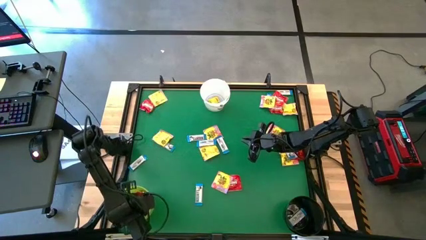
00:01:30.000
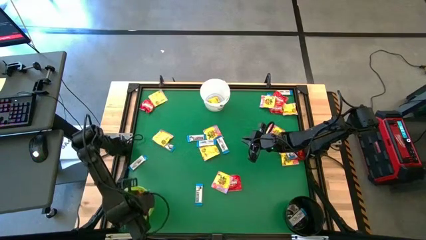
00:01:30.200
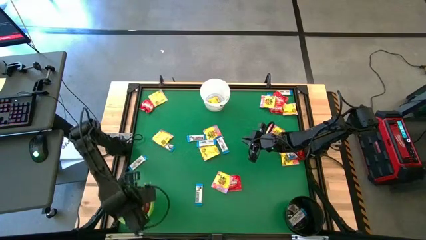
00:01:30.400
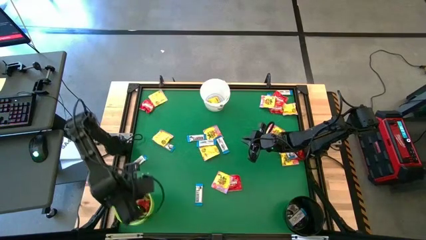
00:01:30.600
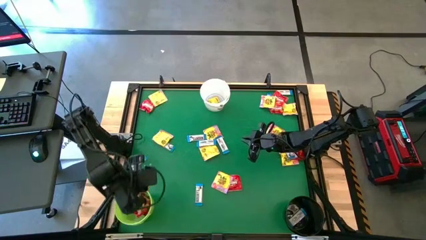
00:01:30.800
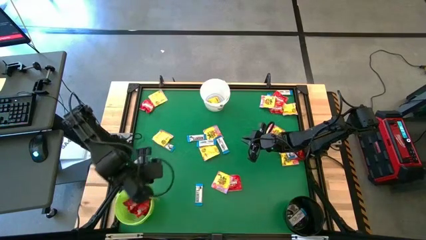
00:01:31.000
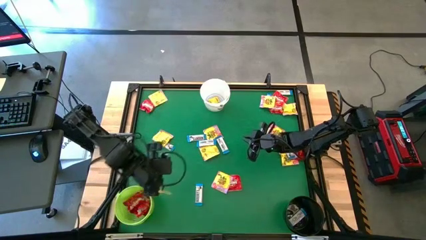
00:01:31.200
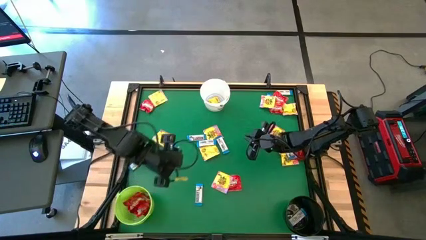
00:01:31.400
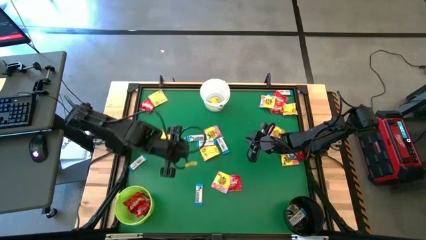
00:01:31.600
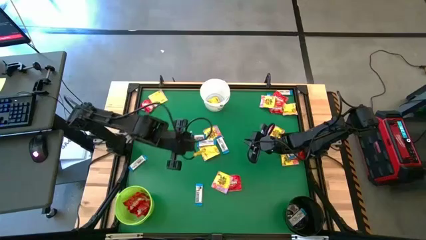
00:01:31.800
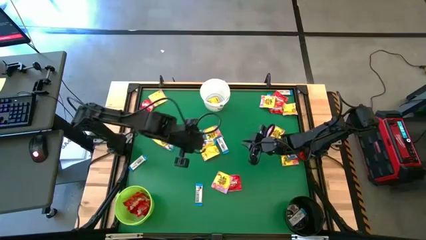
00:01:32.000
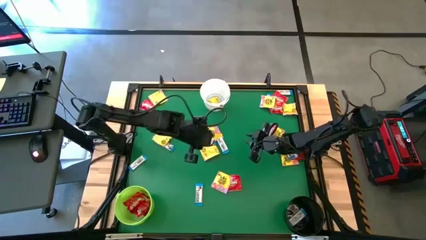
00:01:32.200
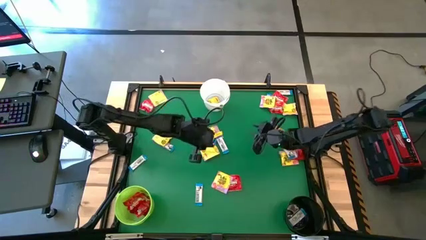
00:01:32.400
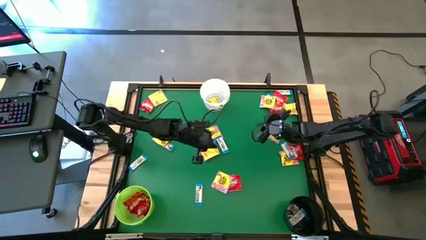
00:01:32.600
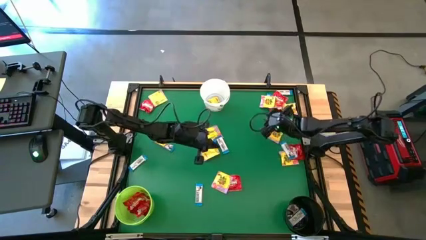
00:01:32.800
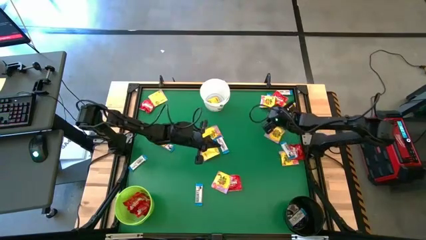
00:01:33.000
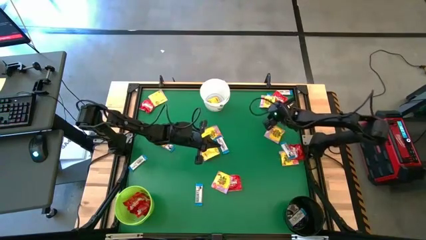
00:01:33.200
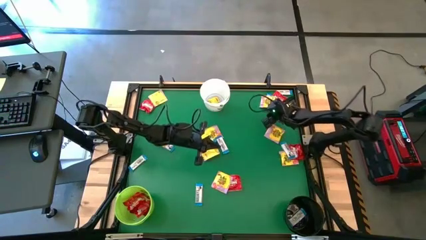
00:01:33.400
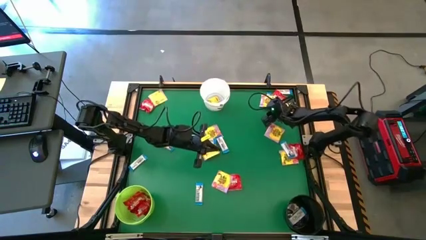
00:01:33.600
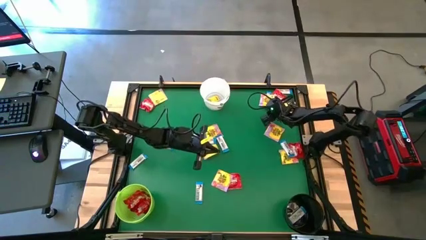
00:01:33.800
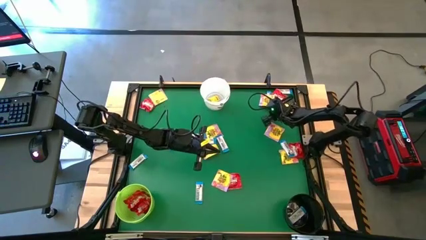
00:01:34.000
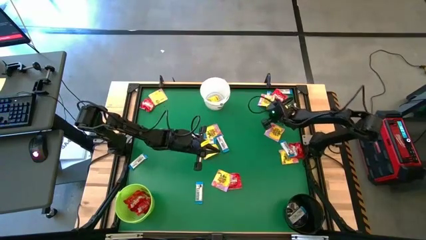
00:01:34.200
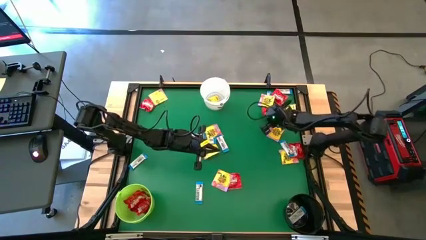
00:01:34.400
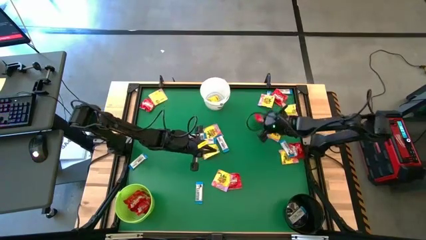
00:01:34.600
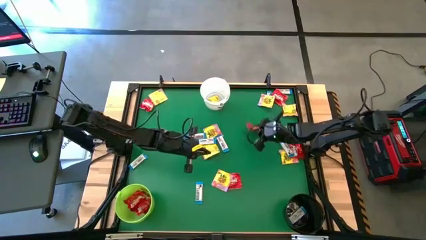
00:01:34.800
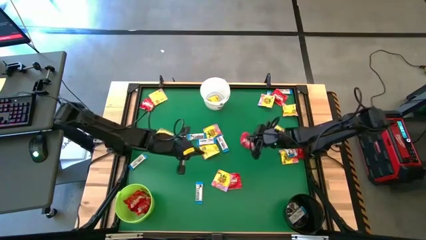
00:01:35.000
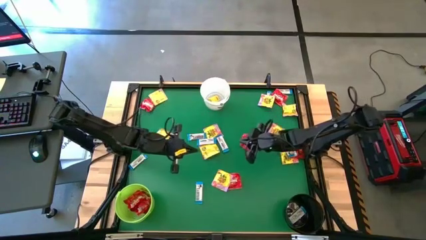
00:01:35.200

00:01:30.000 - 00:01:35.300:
Task: Sort candy by brand, put in halloween buckets
Put the red candy into the green bucket

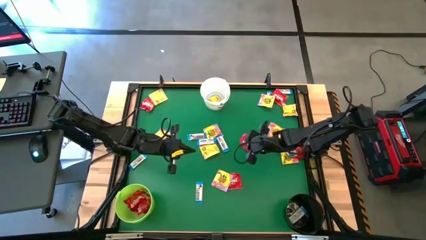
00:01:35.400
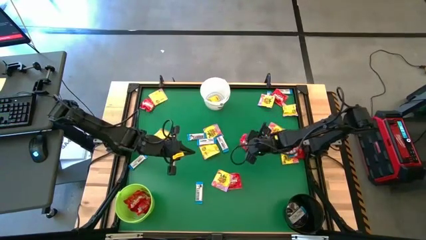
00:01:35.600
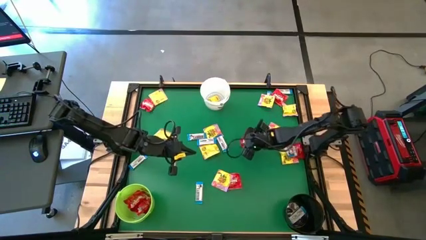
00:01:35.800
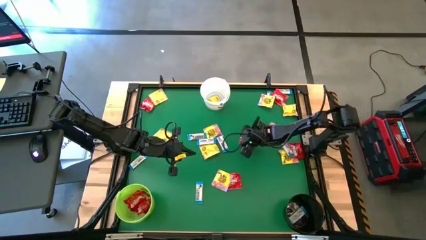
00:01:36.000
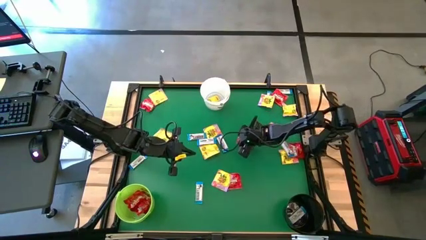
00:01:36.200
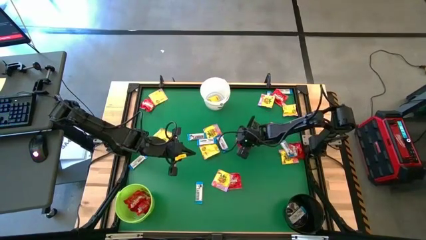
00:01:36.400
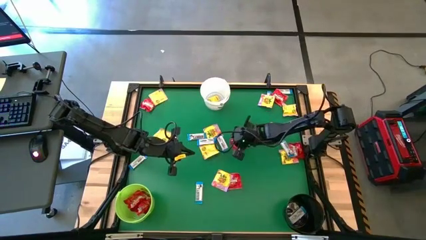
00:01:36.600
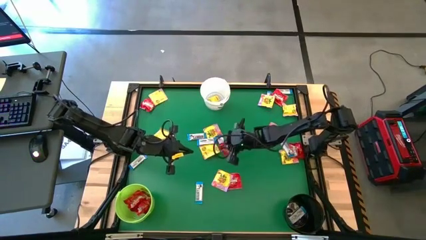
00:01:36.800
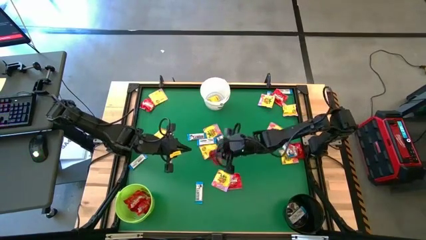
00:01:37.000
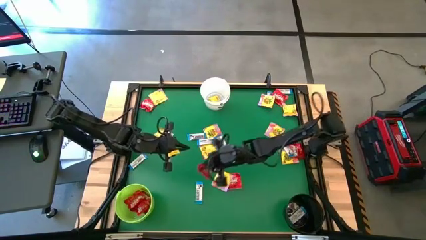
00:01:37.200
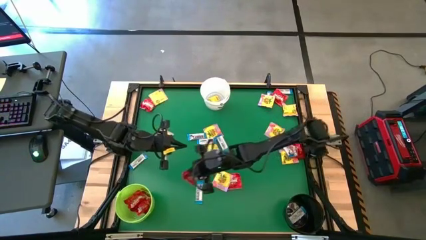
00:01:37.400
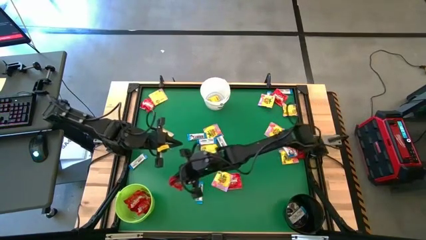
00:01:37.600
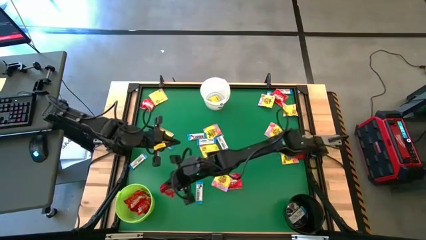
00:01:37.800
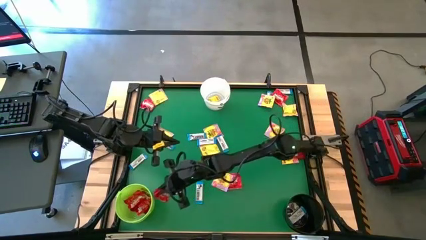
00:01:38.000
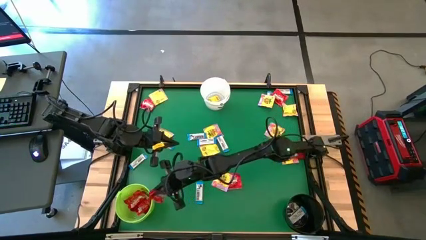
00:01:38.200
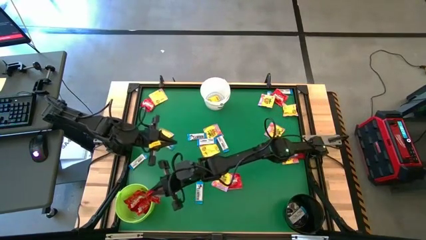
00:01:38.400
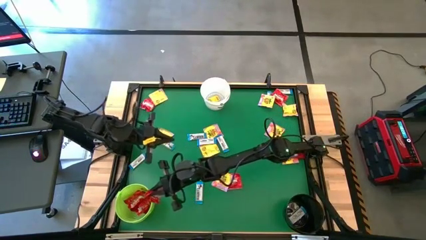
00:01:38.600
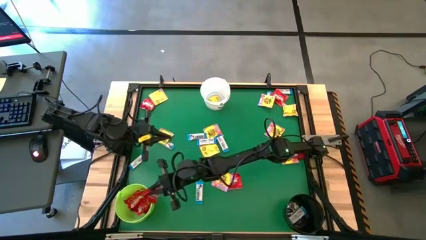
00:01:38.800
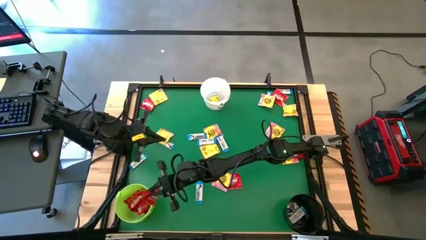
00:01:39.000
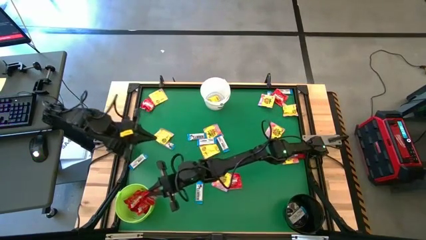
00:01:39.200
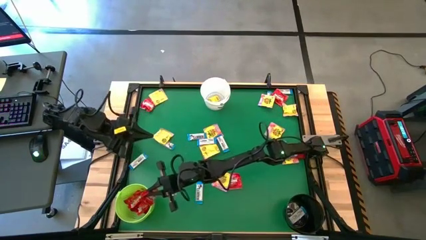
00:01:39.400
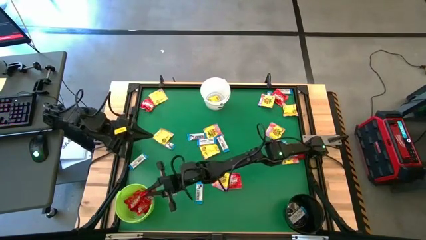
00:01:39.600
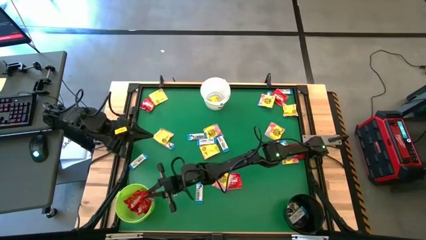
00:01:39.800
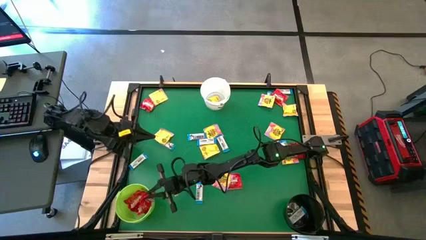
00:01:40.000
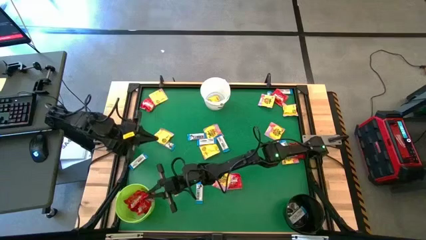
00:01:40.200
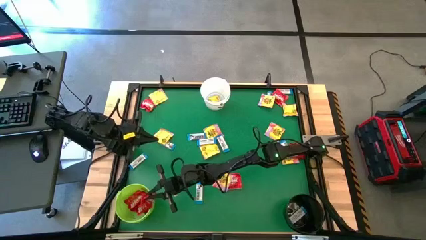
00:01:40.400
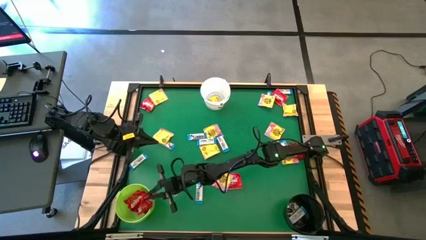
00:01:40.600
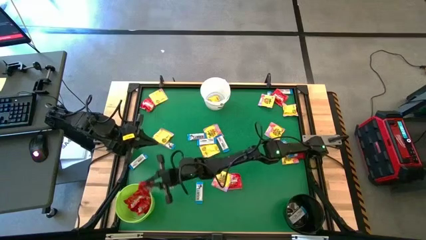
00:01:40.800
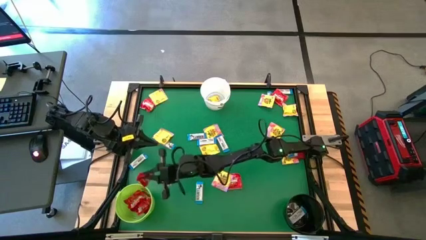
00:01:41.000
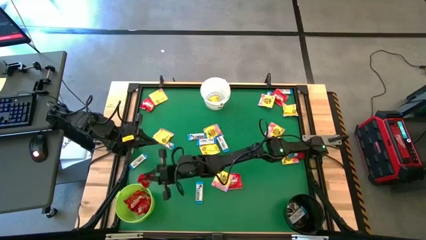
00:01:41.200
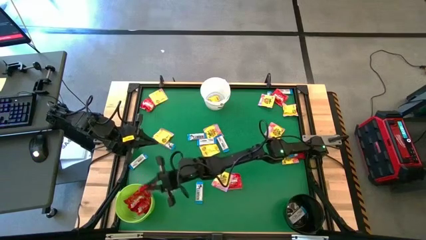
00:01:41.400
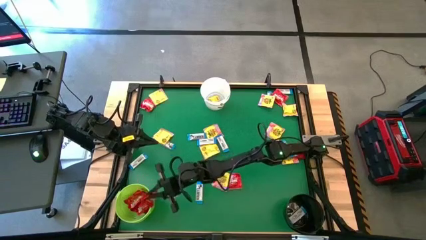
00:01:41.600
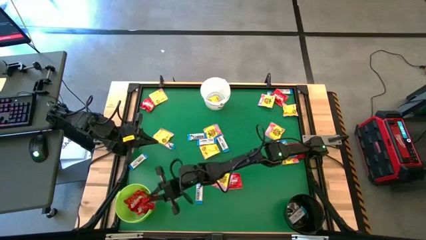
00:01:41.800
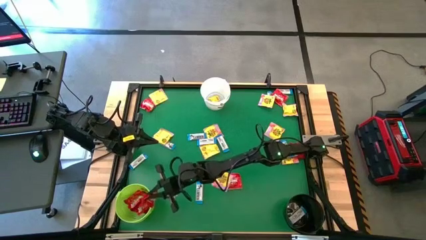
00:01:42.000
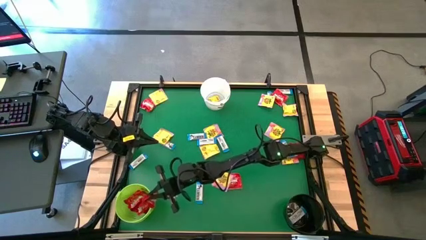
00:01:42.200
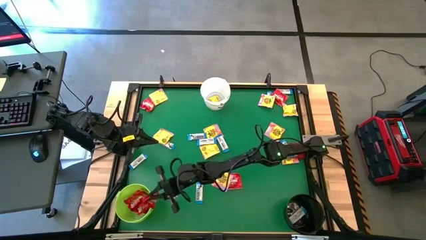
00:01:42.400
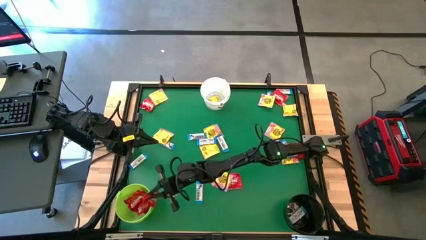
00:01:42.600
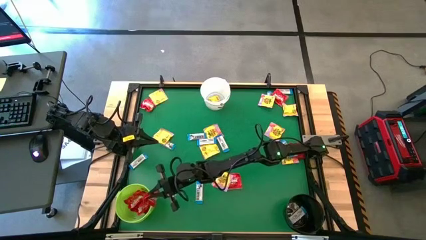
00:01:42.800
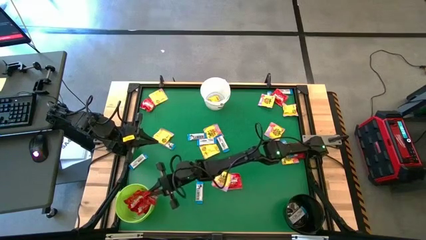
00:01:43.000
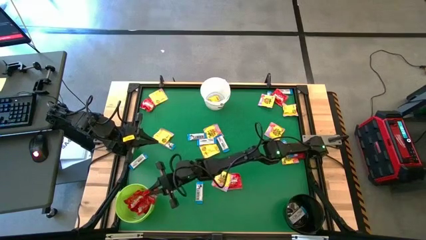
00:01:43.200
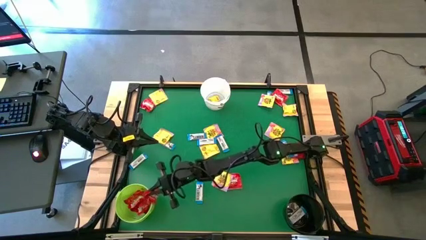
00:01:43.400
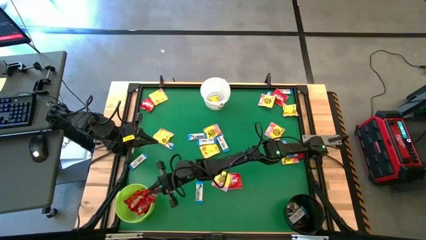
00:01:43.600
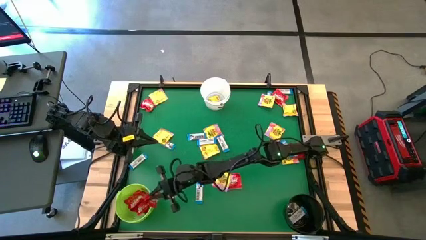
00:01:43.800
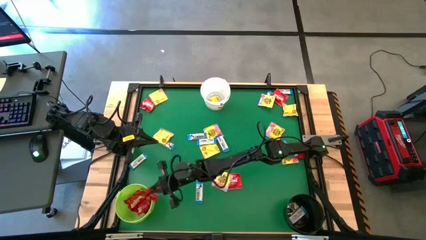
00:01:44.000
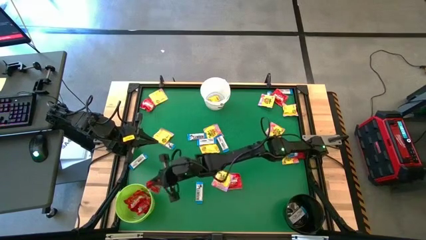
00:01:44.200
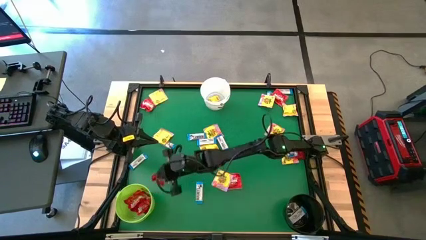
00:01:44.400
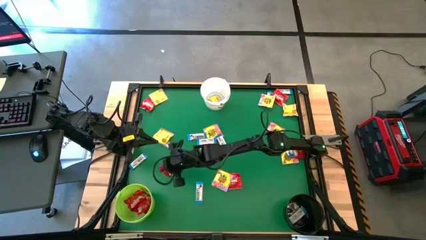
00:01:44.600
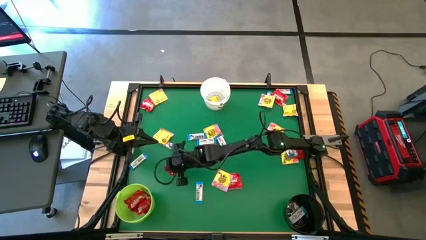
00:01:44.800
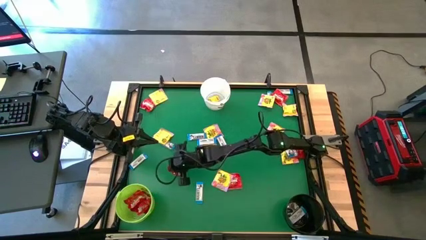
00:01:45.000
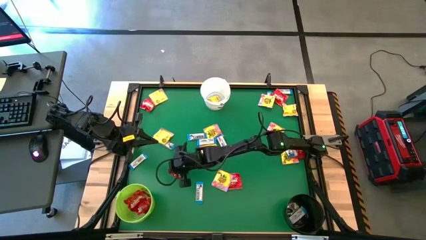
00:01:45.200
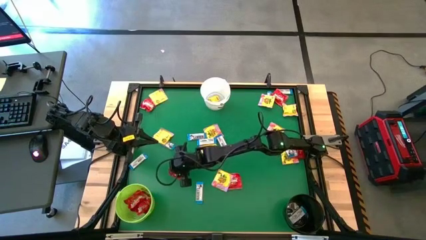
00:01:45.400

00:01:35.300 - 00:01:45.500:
Put the red candy into the green bucket

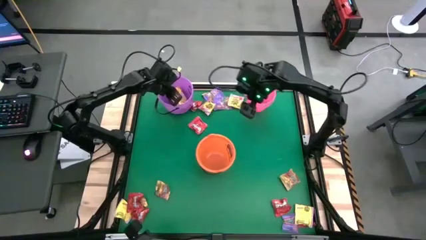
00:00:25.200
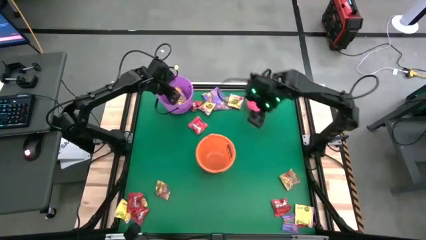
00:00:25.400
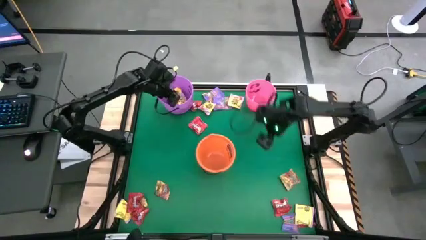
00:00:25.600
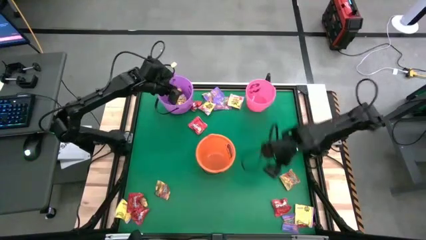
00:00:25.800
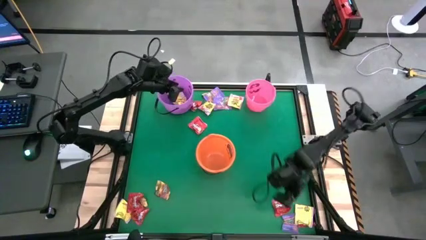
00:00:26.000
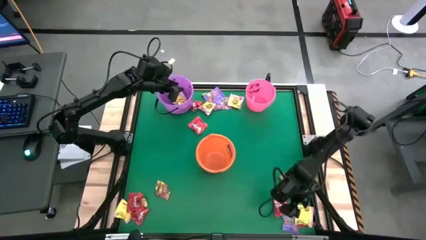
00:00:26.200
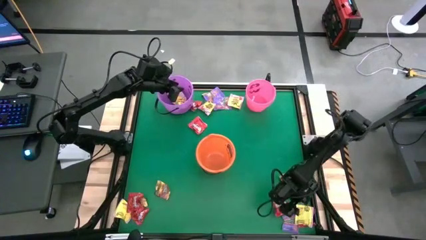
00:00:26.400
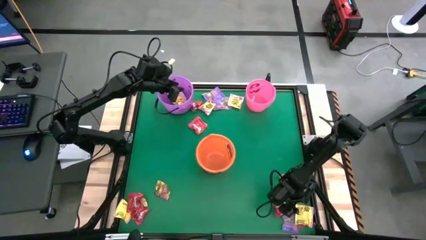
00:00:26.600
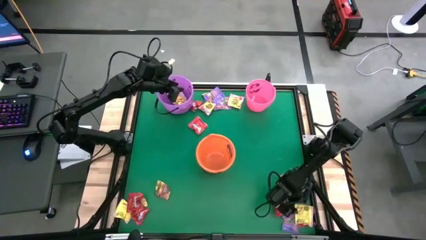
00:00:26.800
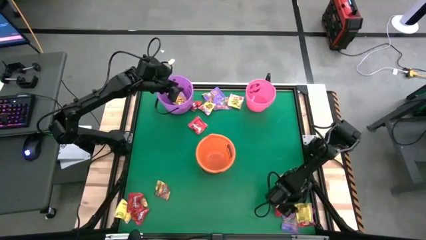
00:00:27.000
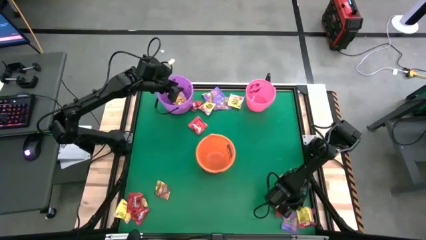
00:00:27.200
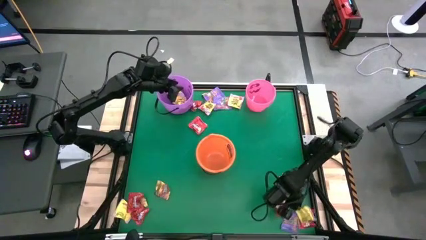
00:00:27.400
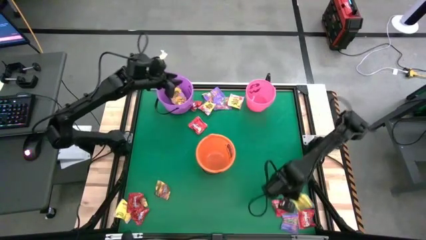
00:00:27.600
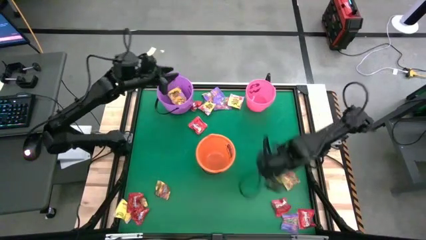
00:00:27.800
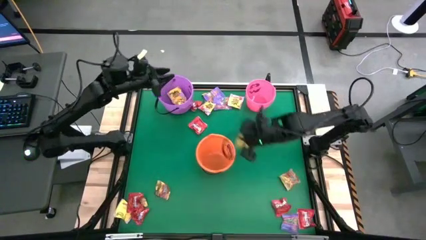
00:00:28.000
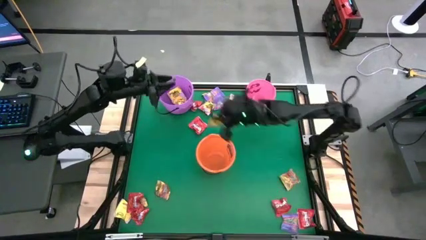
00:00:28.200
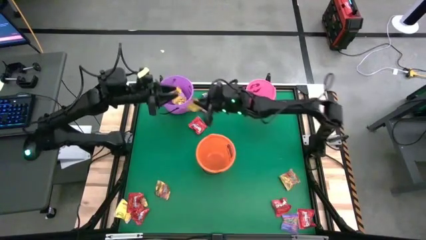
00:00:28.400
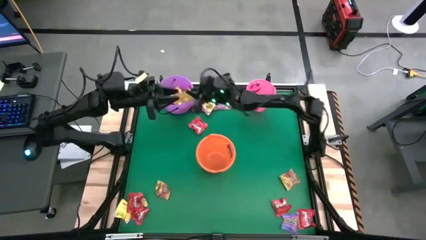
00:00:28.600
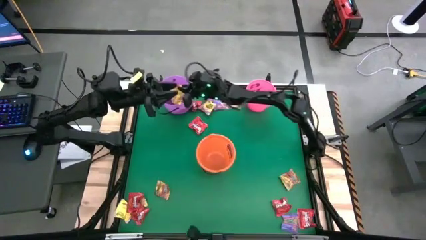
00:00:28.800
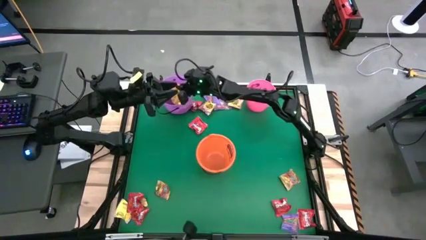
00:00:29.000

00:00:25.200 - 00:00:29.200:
Task: Sort candy by brand, put in halloween buckets
Put the yellow candy into the light violet bucket
